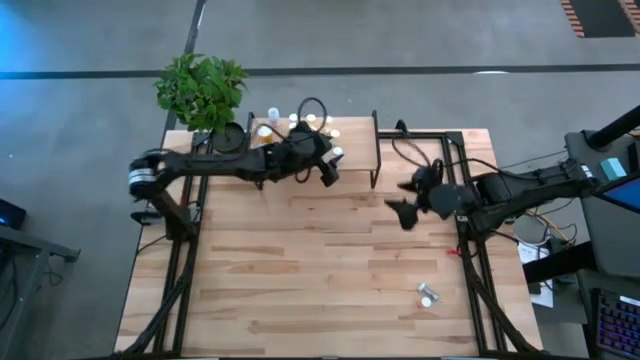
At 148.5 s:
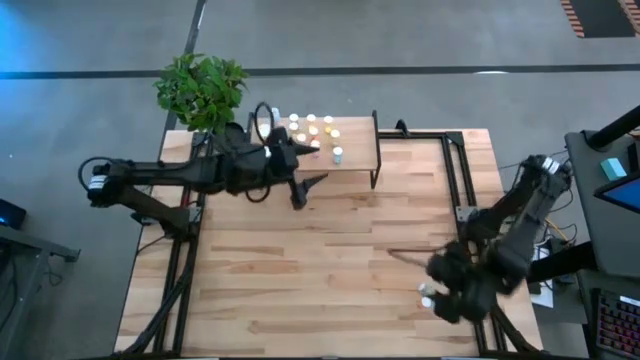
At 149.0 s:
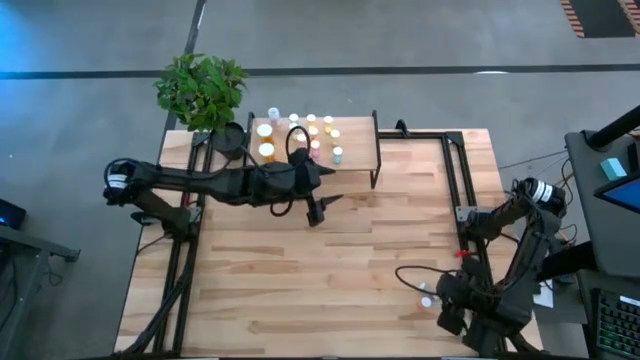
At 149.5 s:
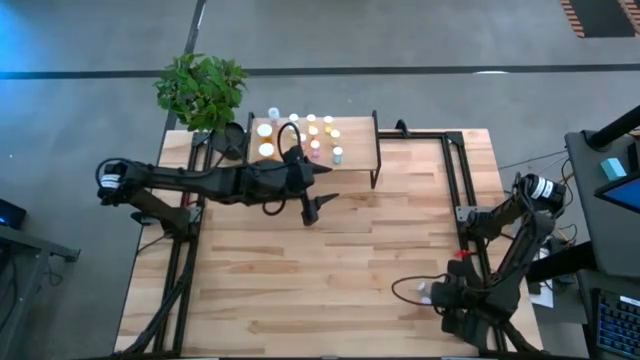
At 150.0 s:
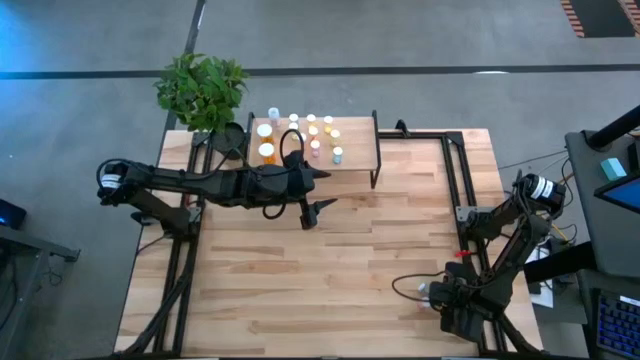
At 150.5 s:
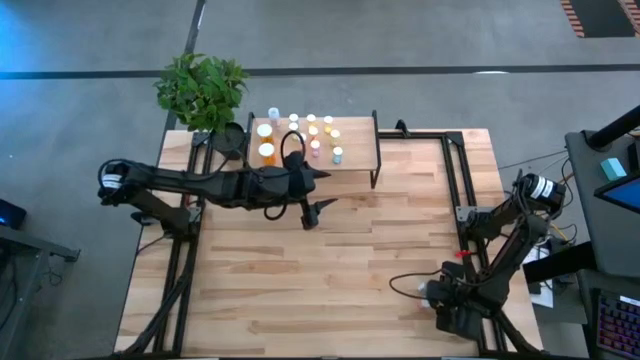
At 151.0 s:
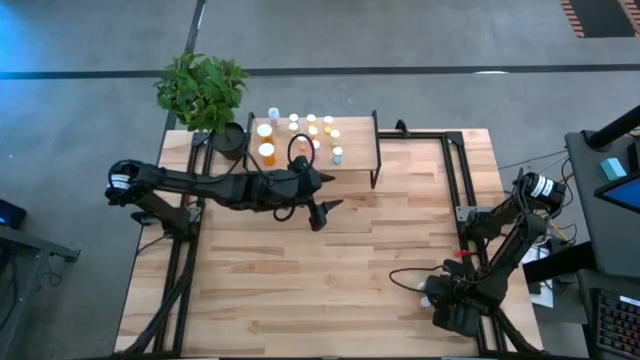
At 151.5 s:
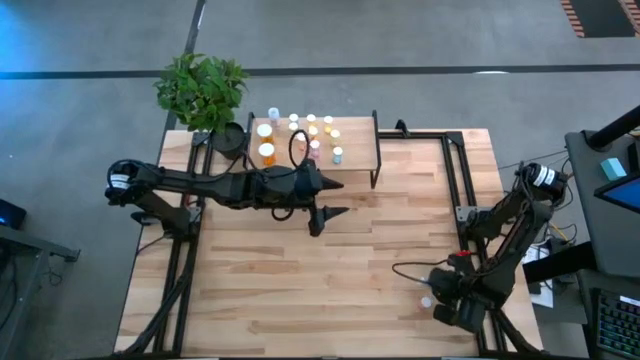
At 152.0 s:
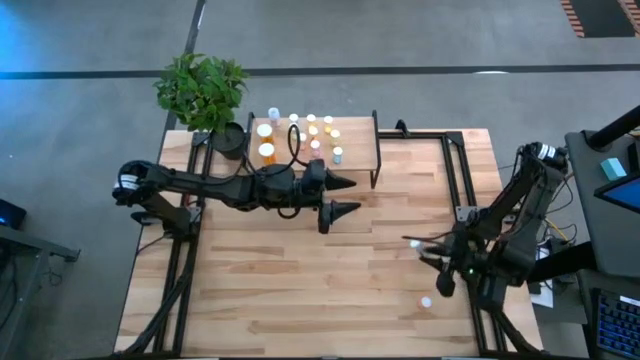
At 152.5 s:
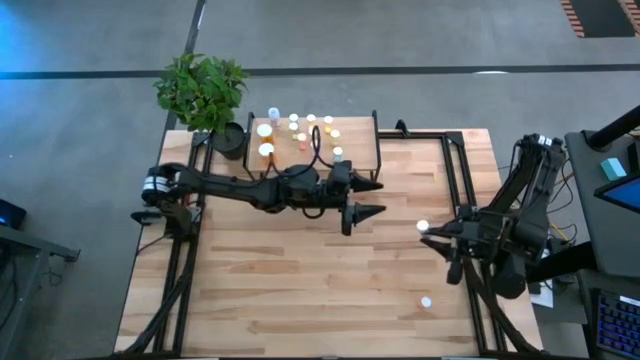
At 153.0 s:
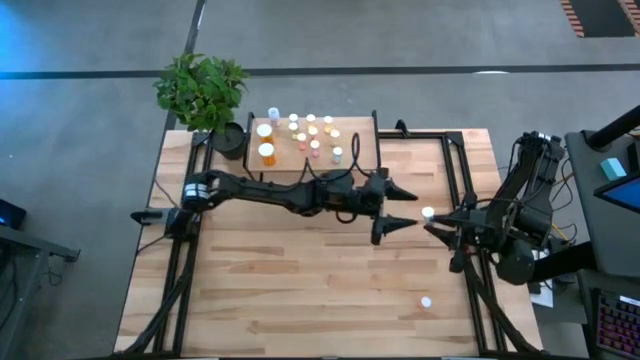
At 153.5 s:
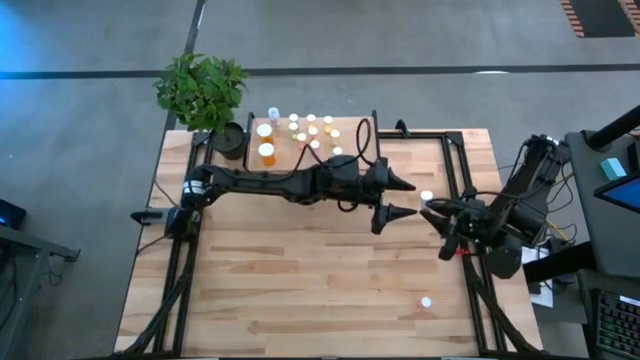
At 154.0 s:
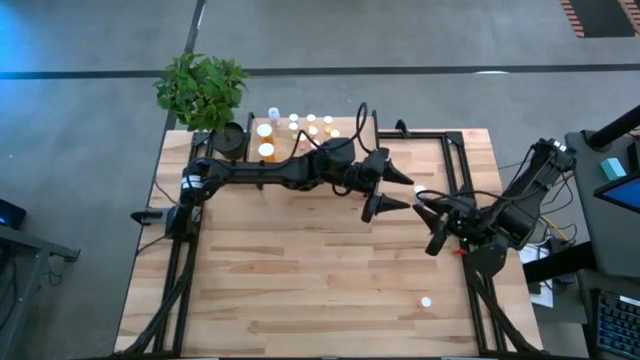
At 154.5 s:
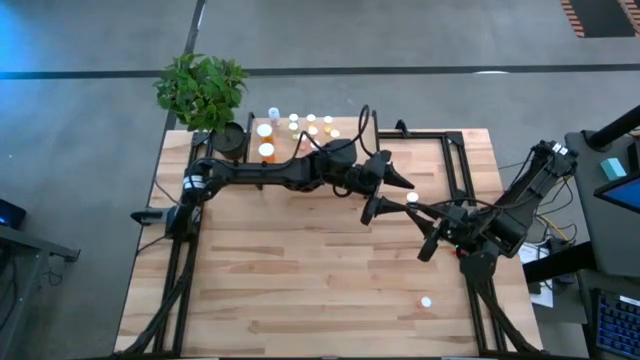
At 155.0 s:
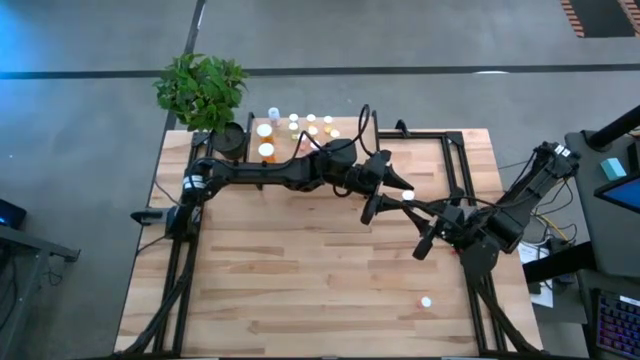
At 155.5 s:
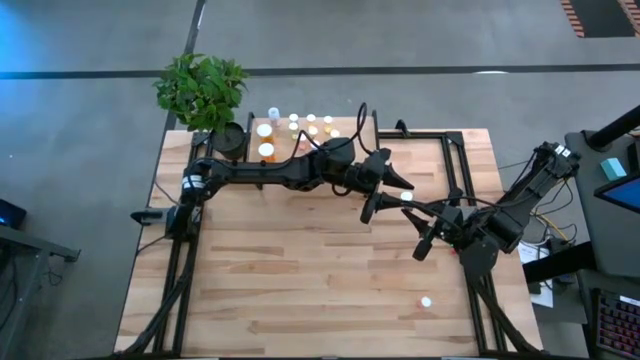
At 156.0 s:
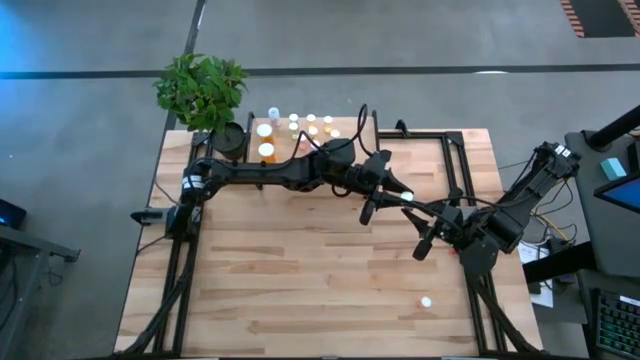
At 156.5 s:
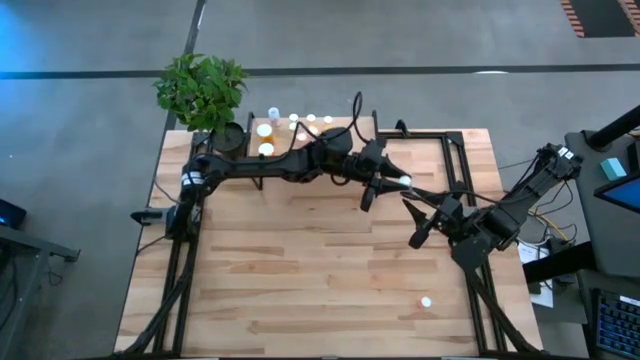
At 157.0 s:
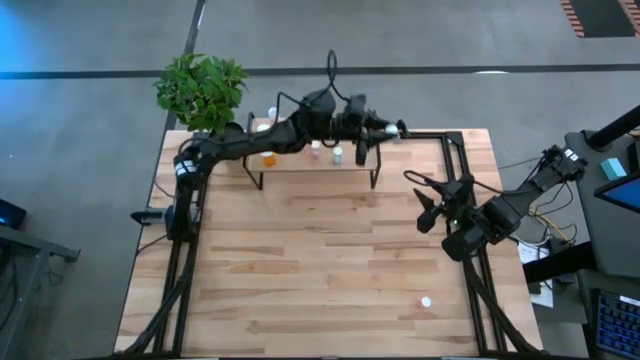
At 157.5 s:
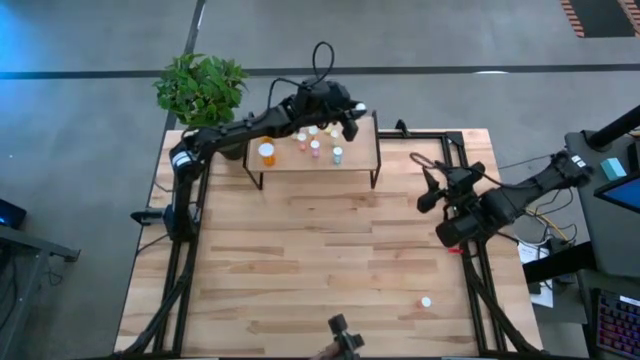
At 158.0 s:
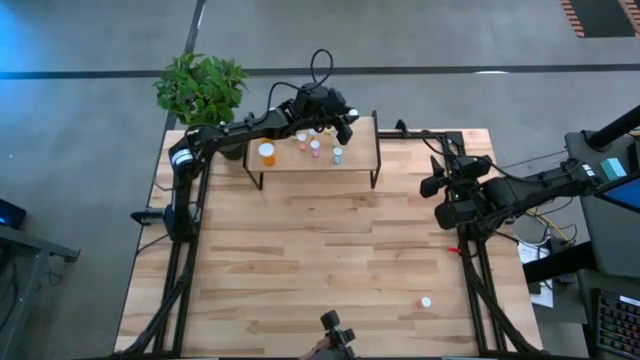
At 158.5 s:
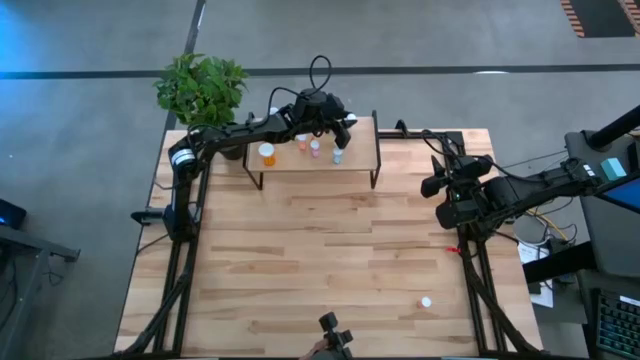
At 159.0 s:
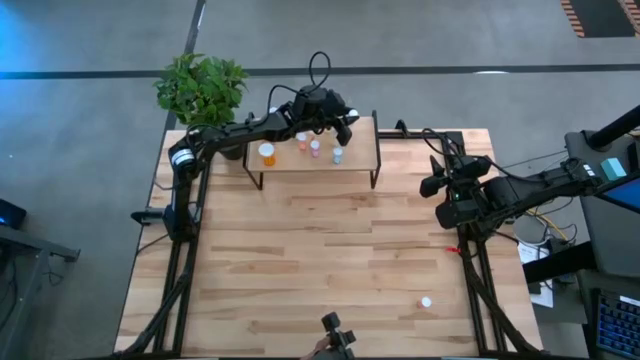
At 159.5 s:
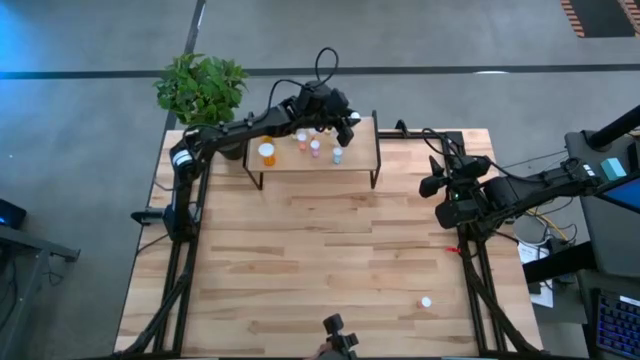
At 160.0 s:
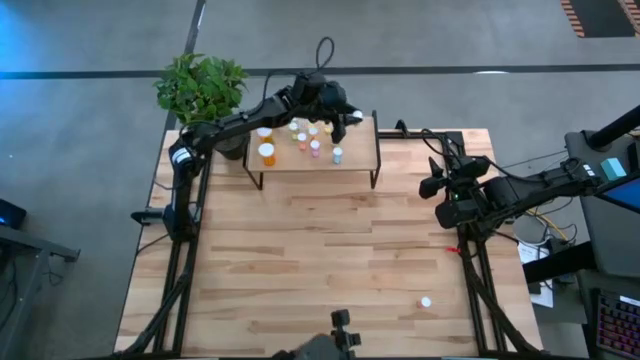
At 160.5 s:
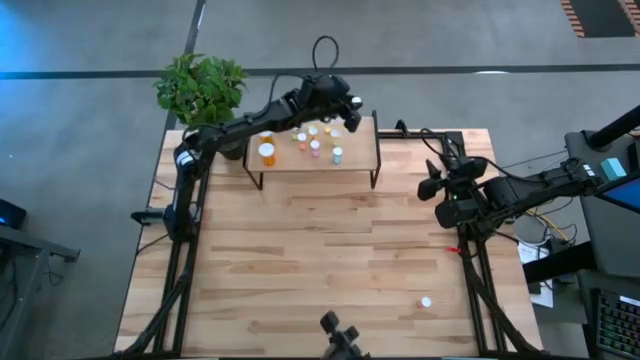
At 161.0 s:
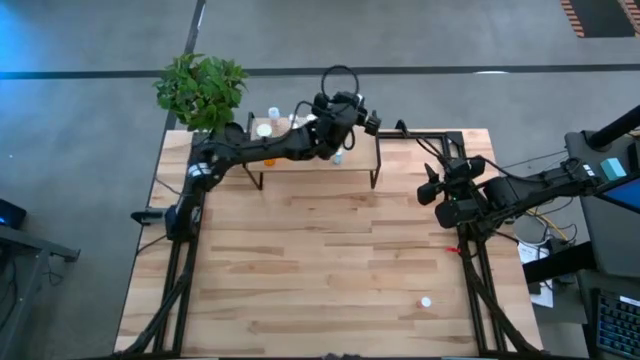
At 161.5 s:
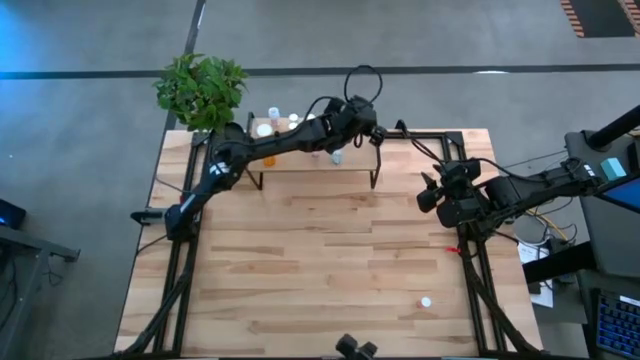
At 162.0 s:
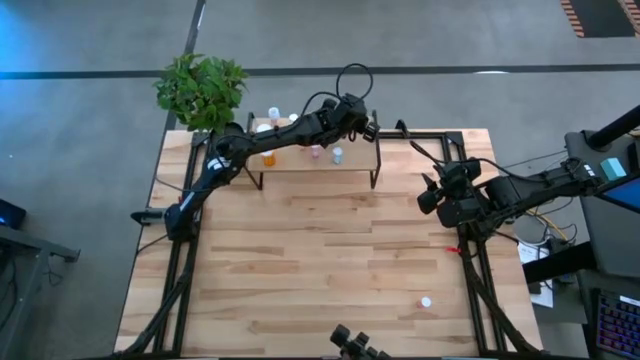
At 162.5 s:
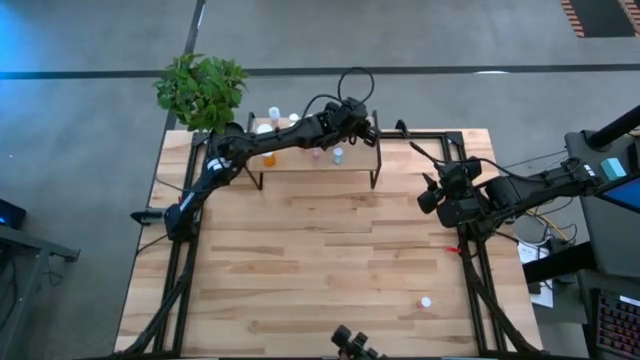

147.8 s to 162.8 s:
Task: Pick and place medicine bottles onto shelf by color
Put the blue pill bottle on the shelf

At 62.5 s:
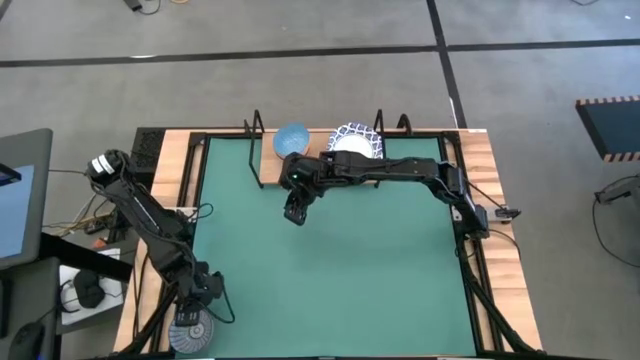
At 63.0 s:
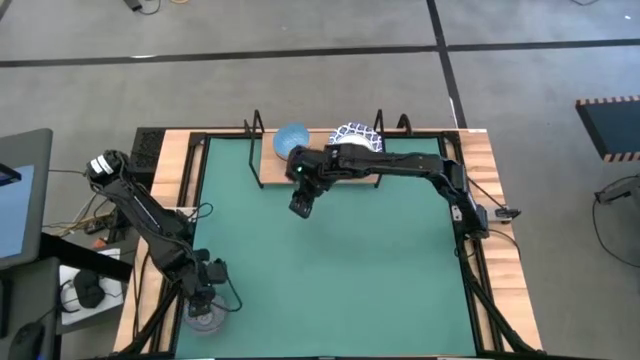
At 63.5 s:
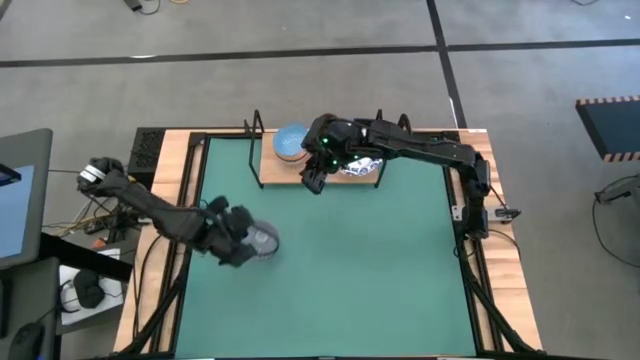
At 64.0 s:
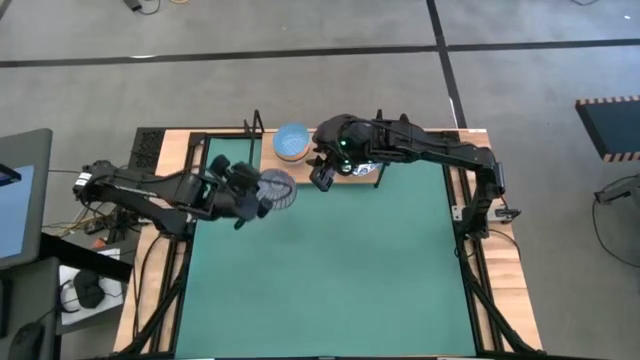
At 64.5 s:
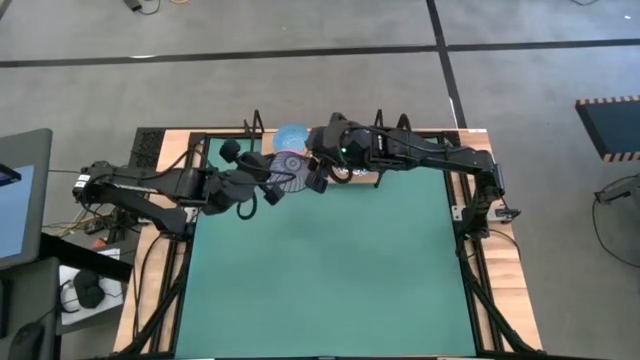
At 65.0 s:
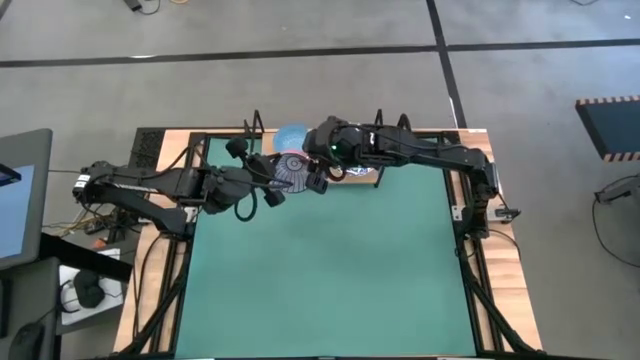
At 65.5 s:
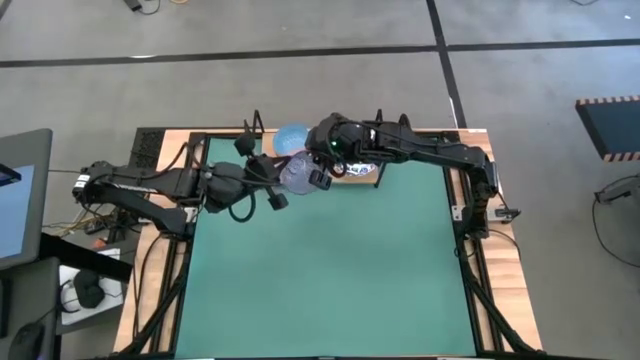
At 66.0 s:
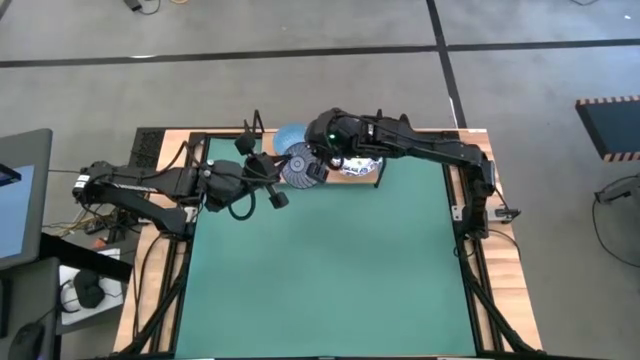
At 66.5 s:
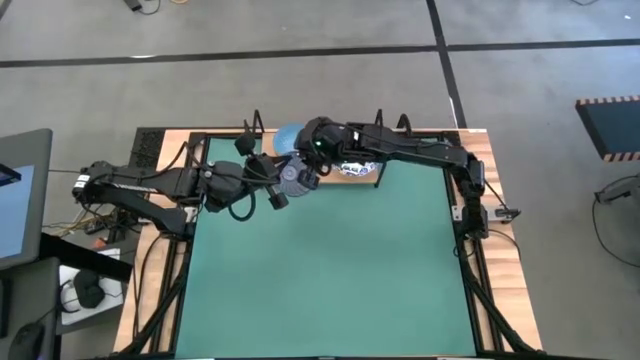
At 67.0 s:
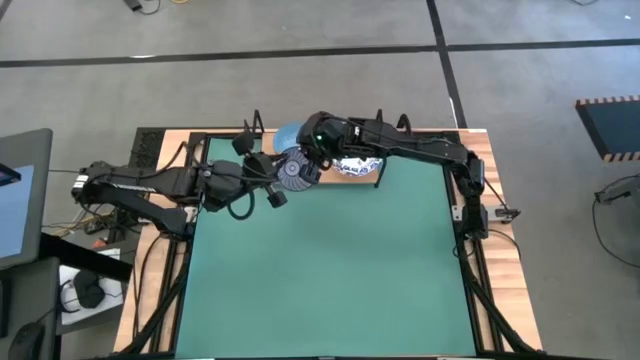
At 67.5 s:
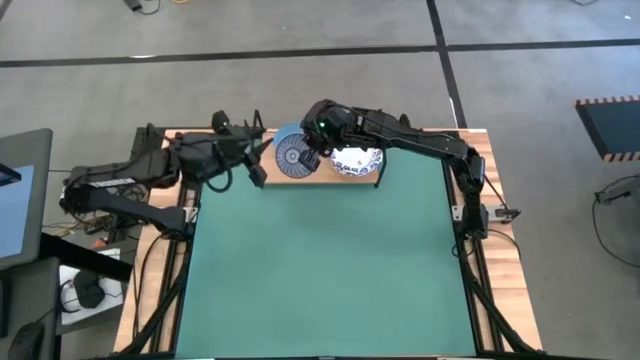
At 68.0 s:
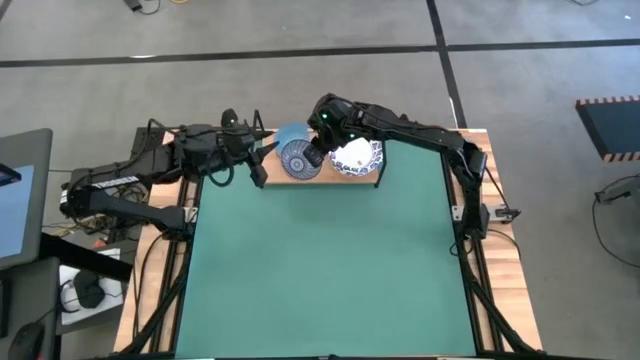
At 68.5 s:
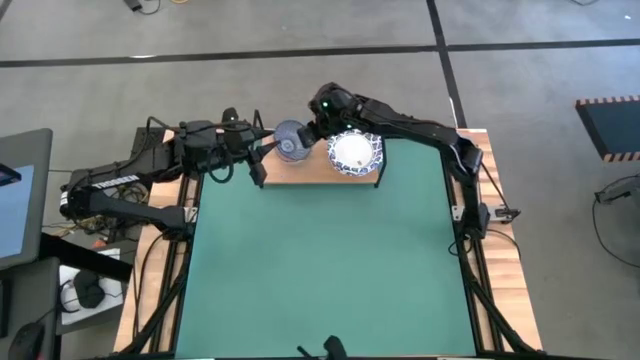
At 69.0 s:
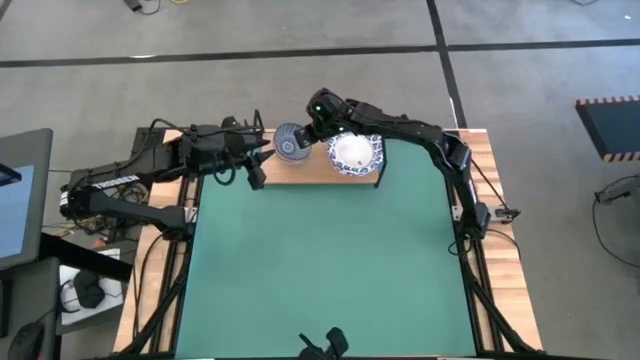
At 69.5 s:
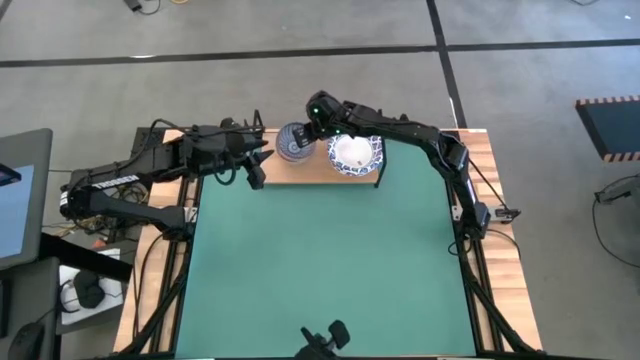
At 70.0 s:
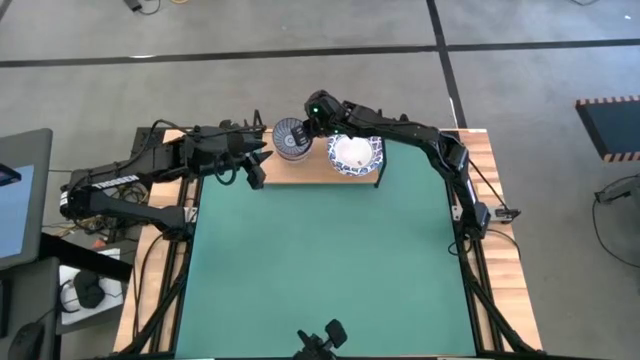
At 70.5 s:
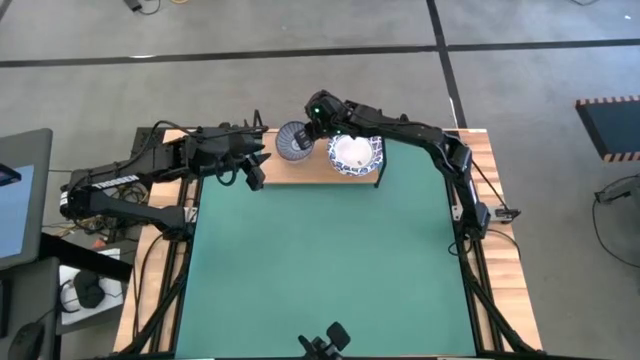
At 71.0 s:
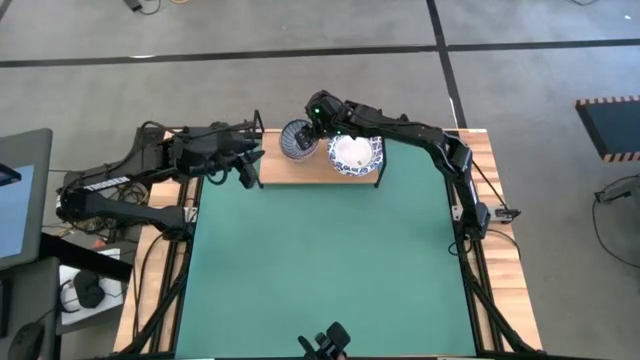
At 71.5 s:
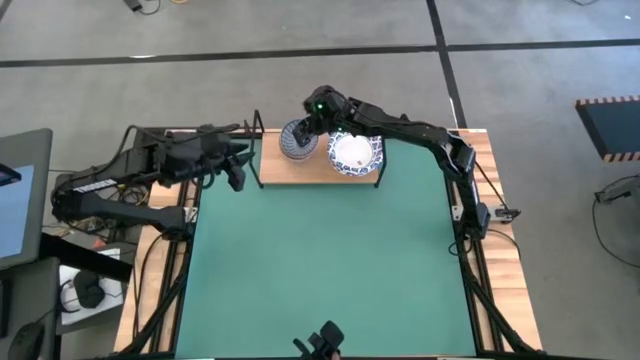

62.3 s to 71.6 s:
Task: Place and stack bowls onto a shelf
Stack the blue bowl on top of the light blue bowl on the shelf
